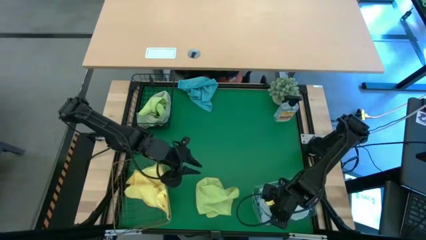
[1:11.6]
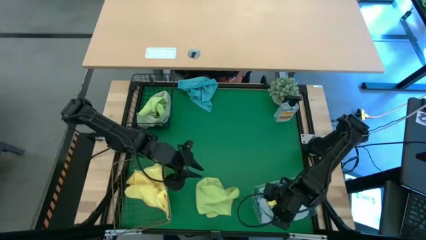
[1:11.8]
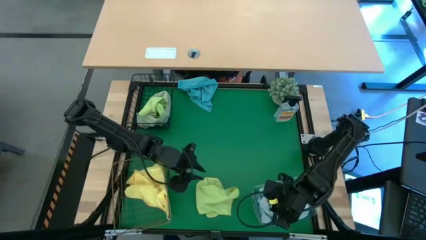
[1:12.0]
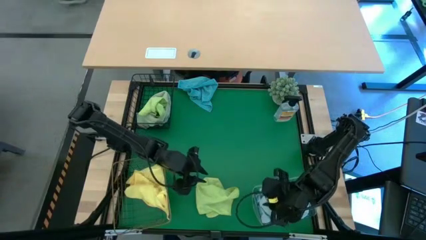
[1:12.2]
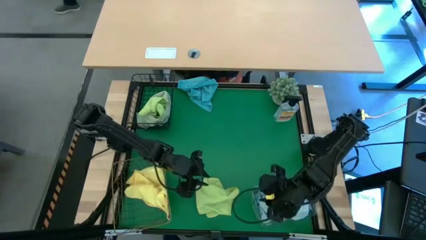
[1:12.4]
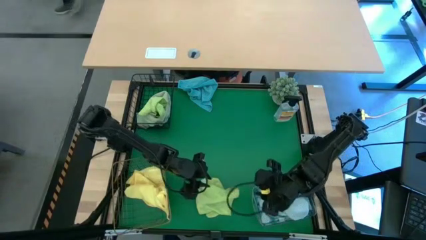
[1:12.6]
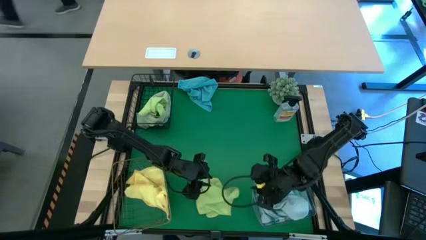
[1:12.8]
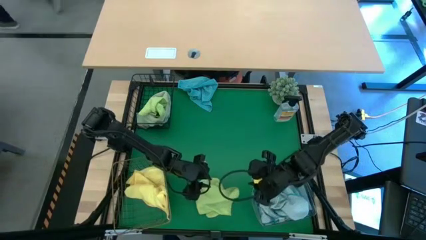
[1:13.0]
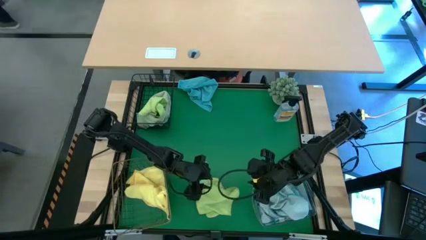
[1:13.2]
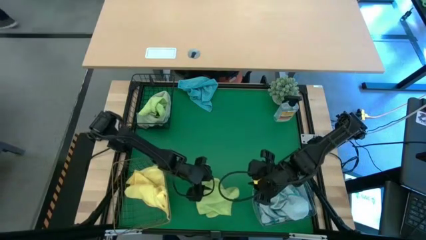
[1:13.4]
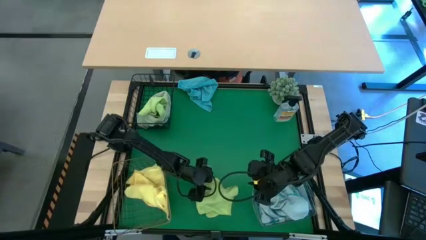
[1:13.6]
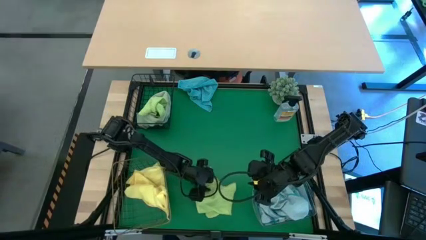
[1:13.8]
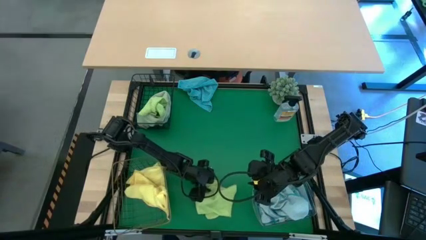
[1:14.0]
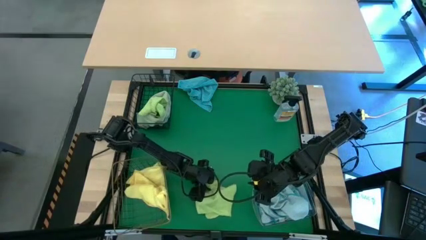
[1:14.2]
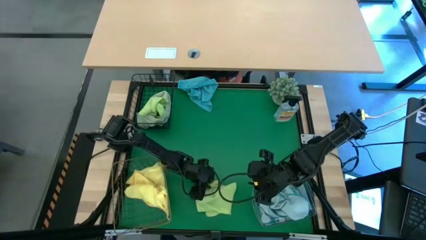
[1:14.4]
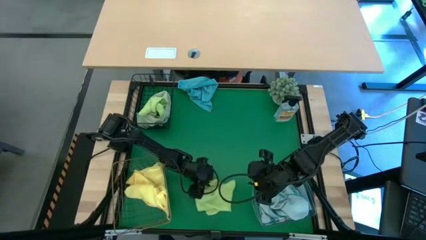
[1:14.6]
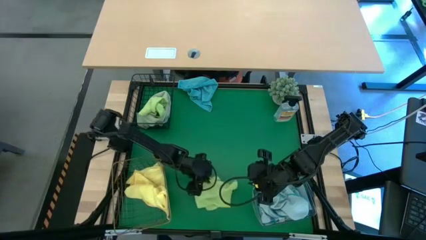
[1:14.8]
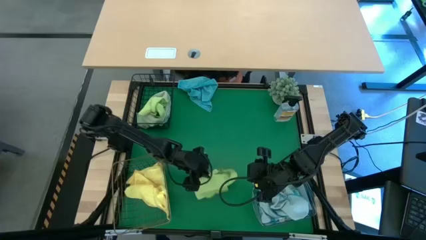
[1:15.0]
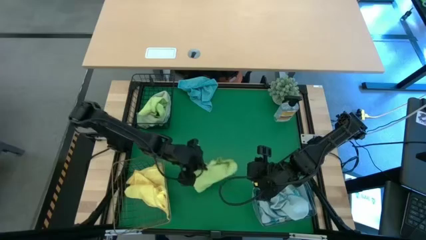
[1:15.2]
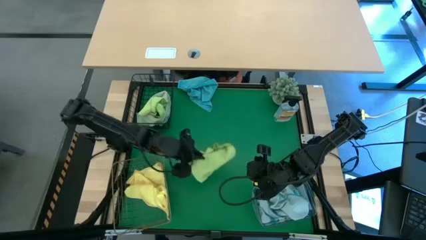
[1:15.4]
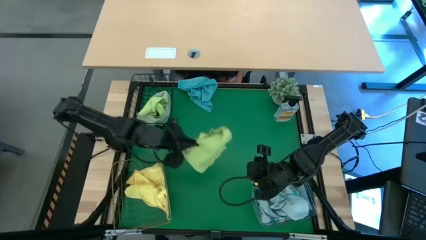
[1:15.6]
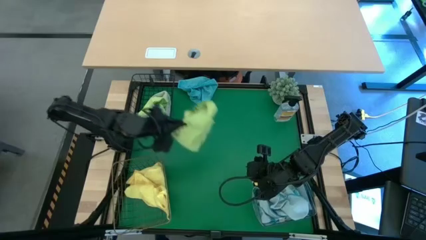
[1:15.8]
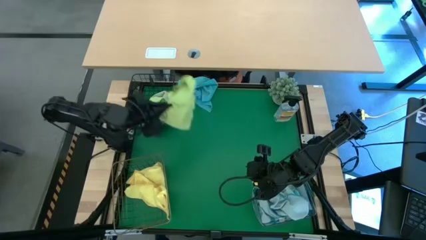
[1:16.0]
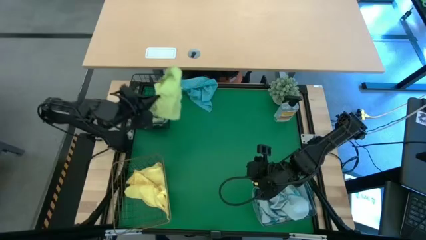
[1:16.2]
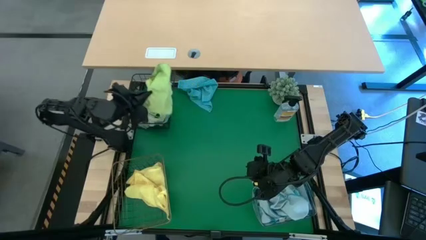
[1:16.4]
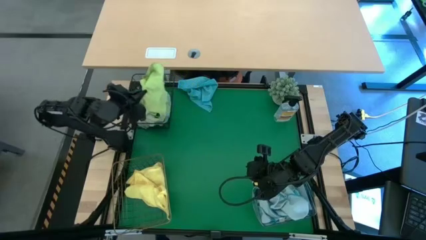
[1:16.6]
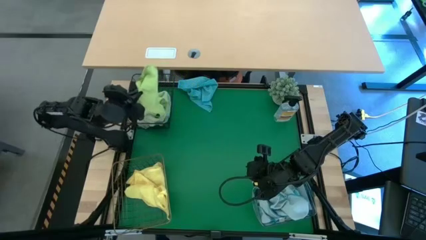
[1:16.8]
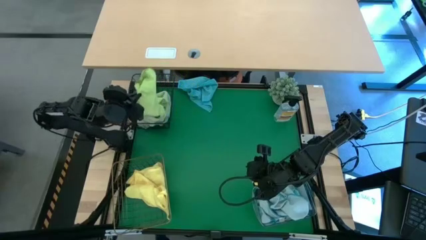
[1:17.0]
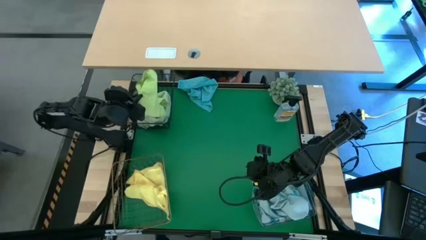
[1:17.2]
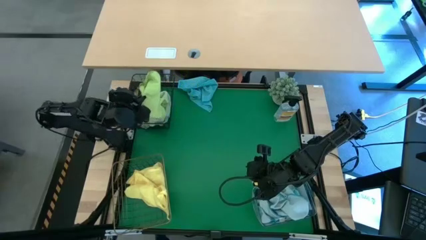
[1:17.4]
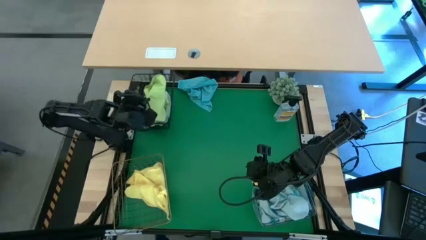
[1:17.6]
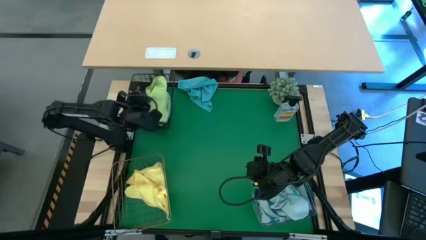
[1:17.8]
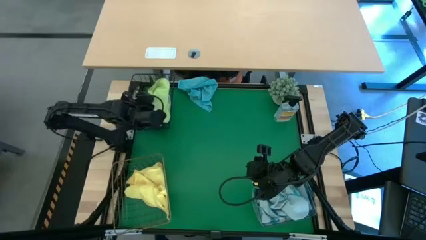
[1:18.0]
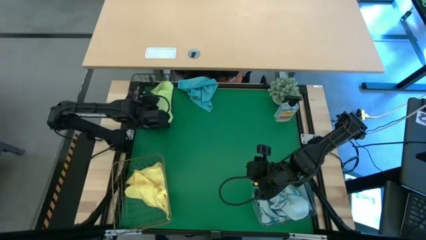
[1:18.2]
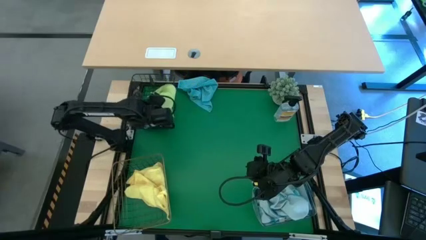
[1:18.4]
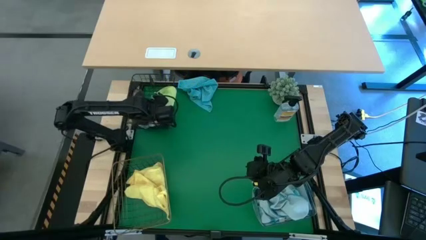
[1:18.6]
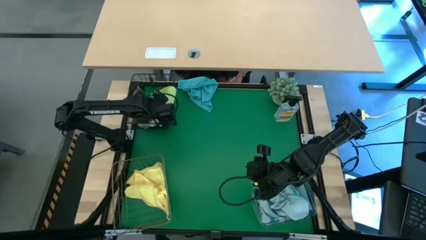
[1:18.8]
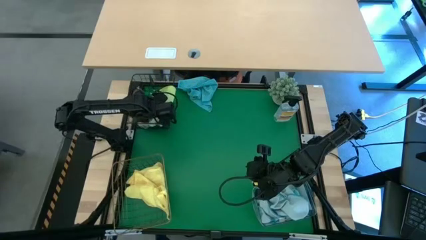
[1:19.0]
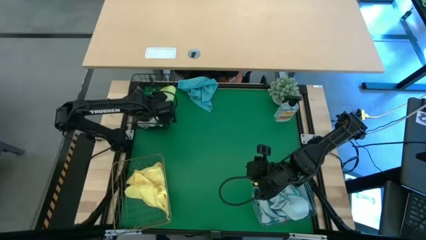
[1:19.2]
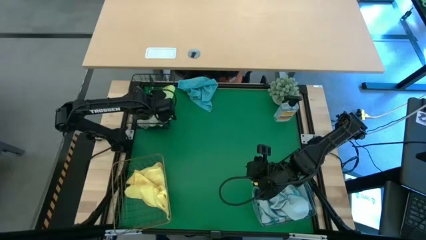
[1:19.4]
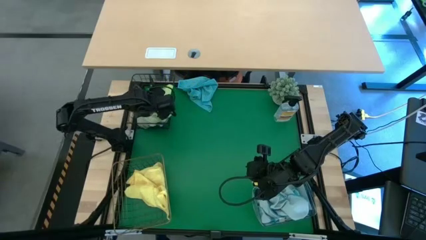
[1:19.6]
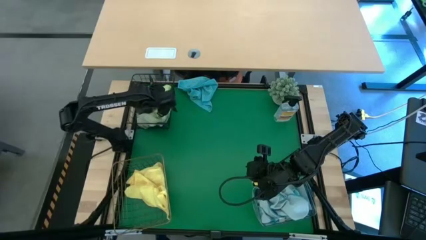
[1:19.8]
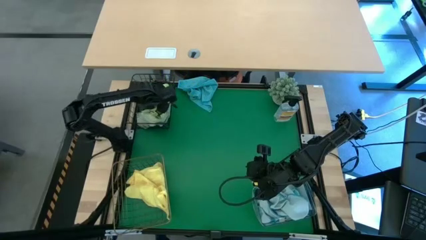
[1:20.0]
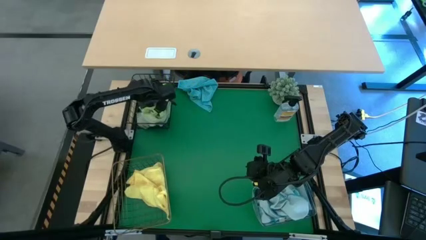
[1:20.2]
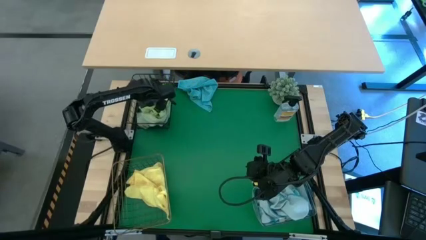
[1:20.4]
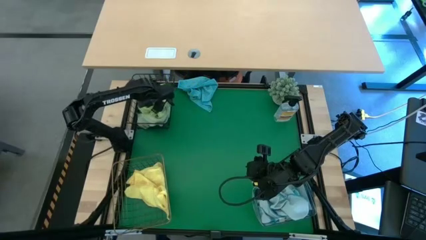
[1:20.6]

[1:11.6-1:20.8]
Task: Sort microfiber towel by color & place in baskets
Put the green microfiber cloth into the black wire basket

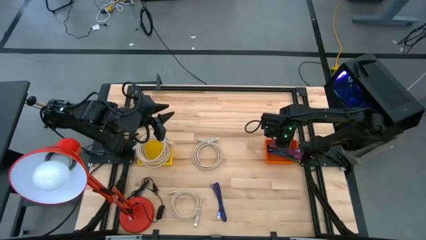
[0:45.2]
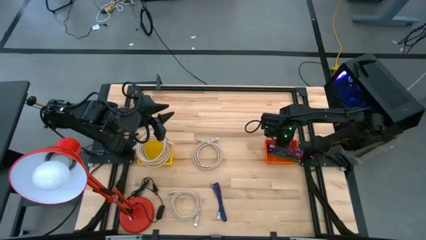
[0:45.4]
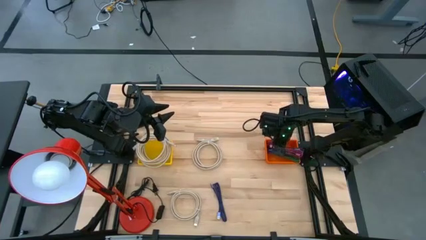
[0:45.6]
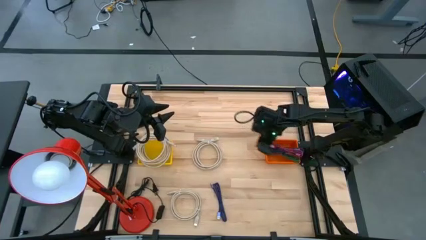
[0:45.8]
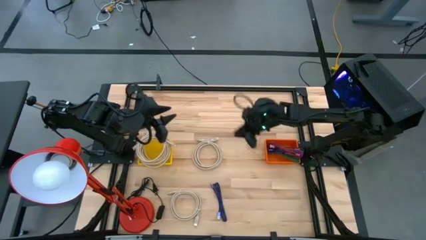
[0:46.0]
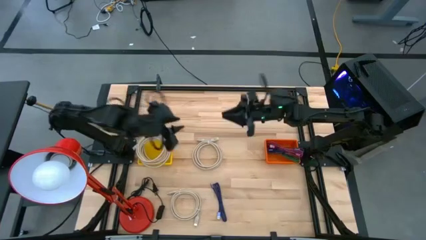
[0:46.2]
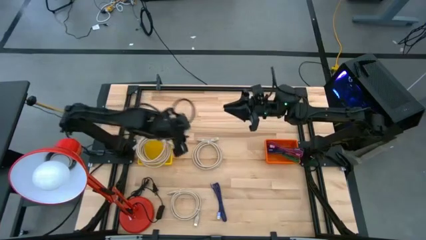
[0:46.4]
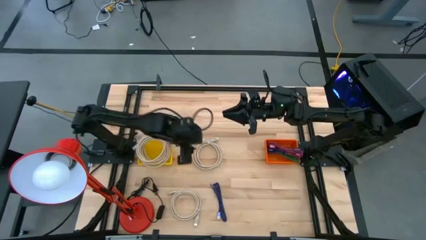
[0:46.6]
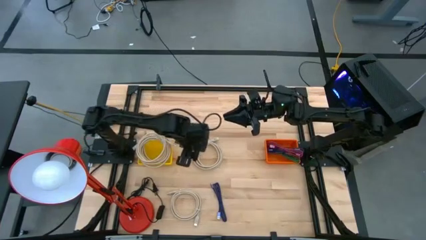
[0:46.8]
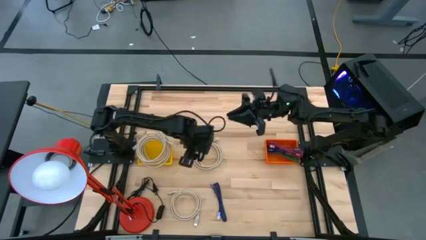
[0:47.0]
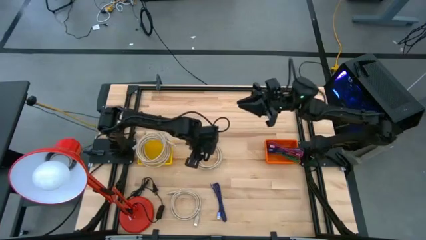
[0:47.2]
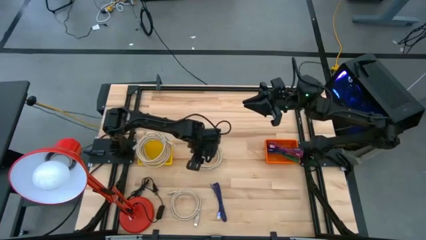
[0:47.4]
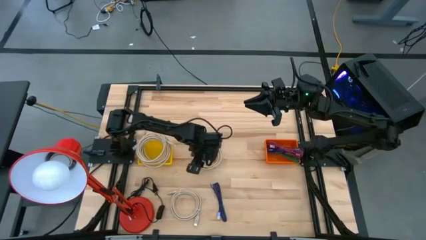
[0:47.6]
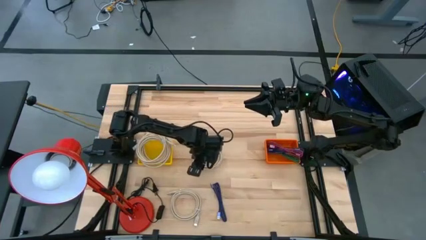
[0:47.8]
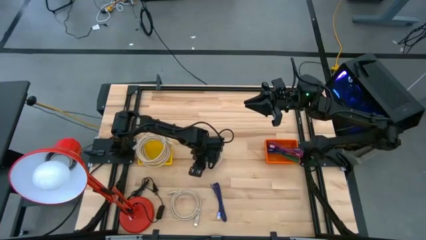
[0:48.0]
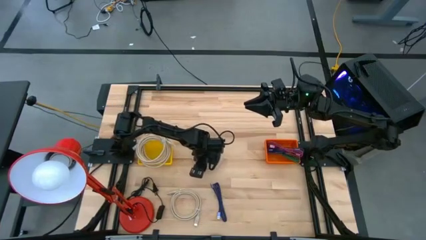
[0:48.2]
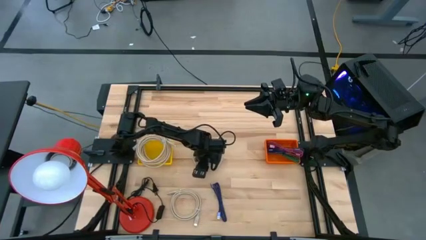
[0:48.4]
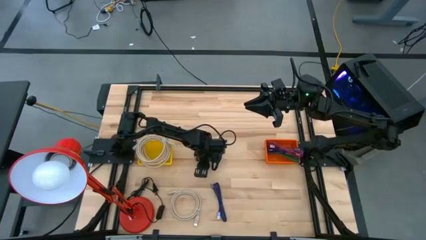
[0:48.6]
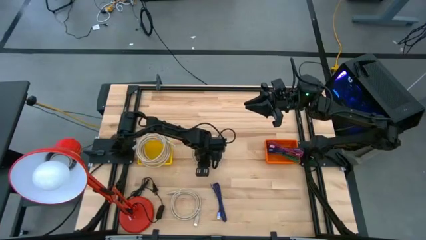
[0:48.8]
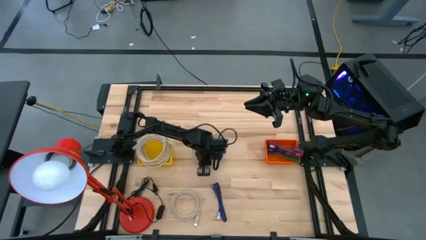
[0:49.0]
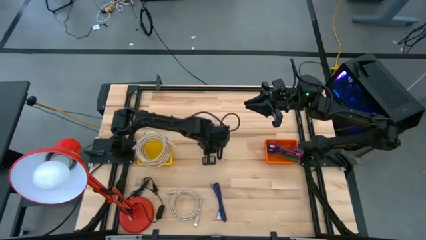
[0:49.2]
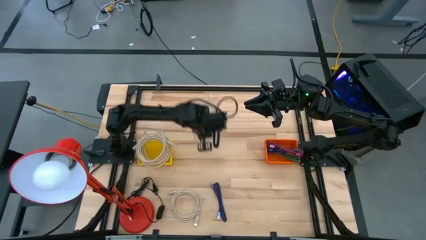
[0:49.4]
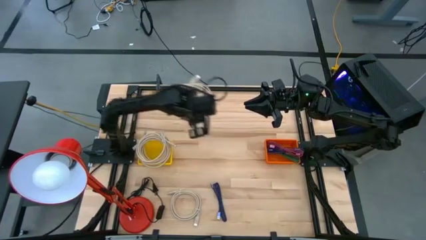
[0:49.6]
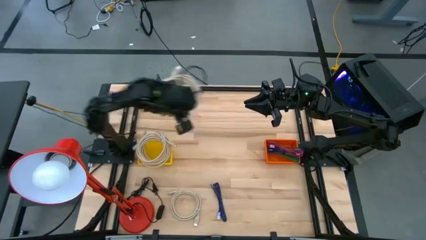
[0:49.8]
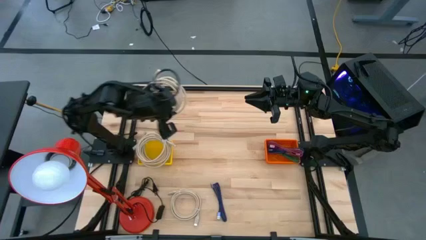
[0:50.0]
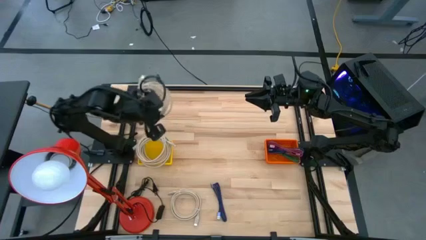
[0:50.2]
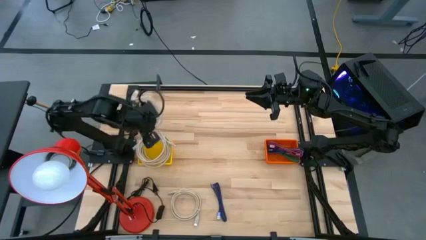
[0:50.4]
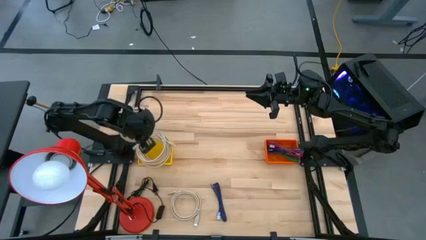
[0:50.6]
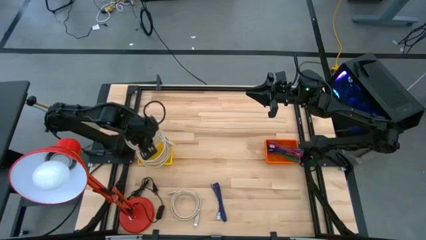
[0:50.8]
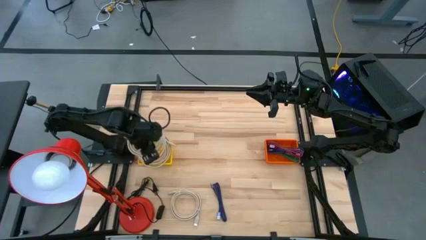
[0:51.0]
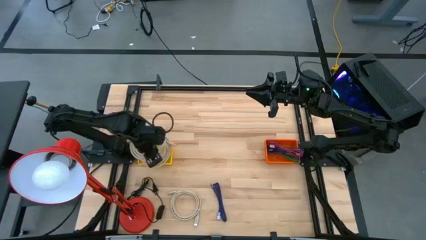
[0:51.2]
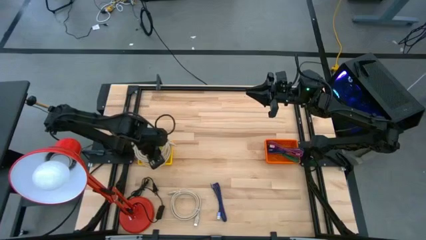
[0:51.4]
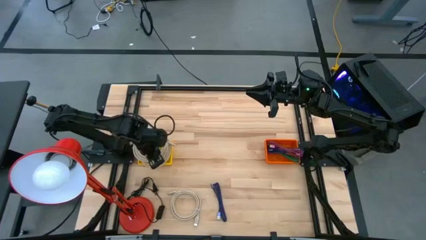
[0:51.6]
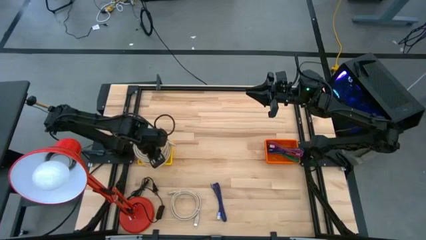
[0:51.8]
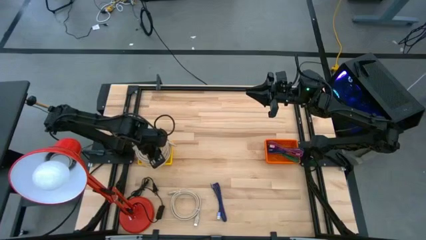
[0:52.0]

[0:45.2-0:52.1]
Task: Pick & Place USB Port
Put the light brown HDMI cable into the yellow bin
